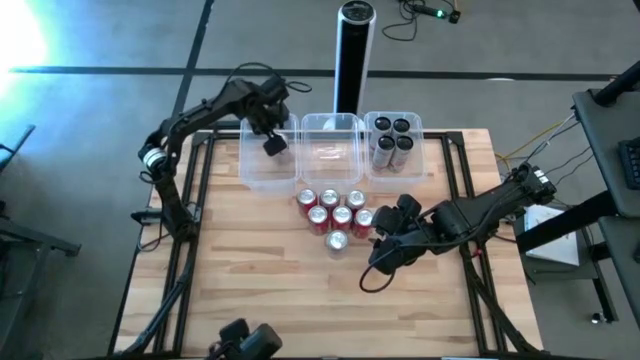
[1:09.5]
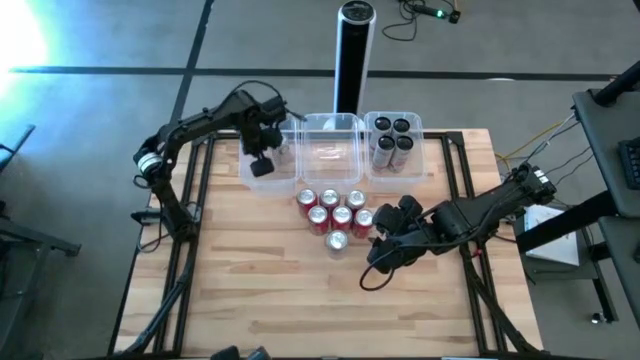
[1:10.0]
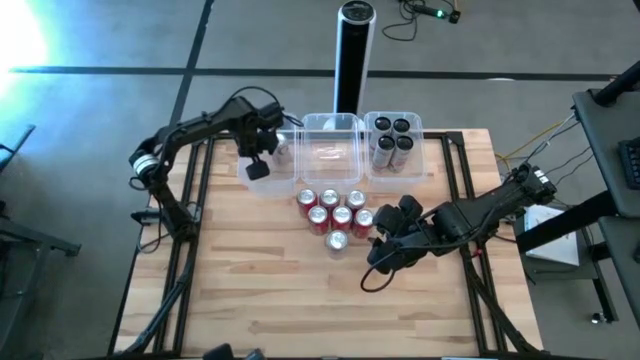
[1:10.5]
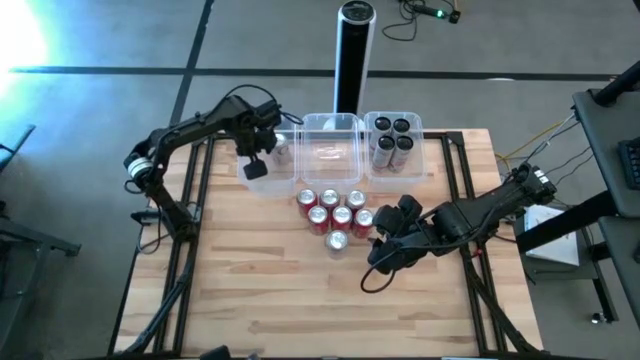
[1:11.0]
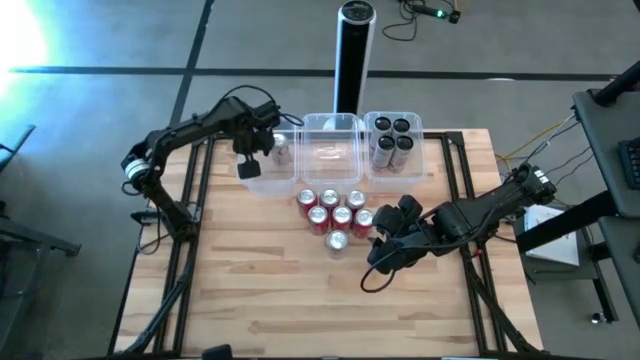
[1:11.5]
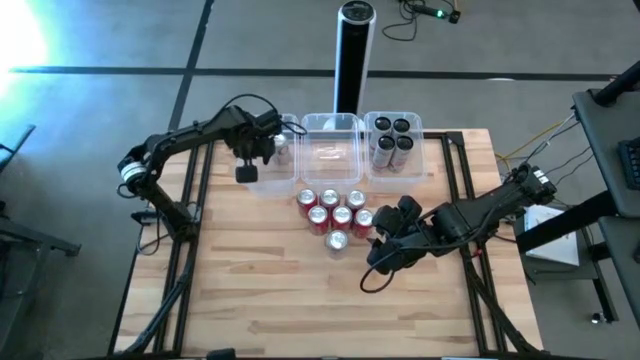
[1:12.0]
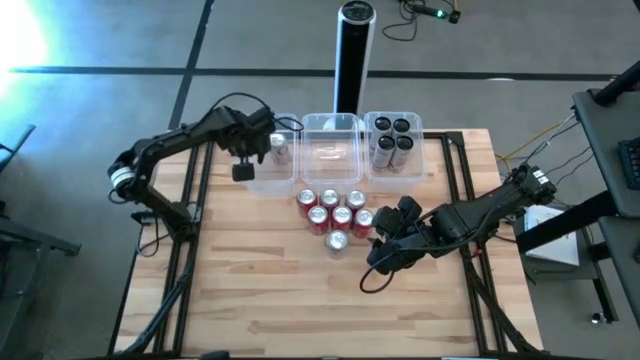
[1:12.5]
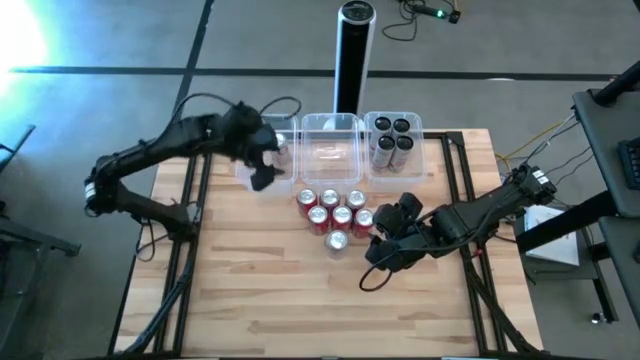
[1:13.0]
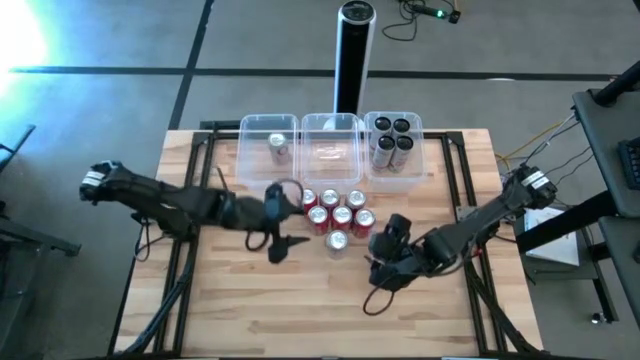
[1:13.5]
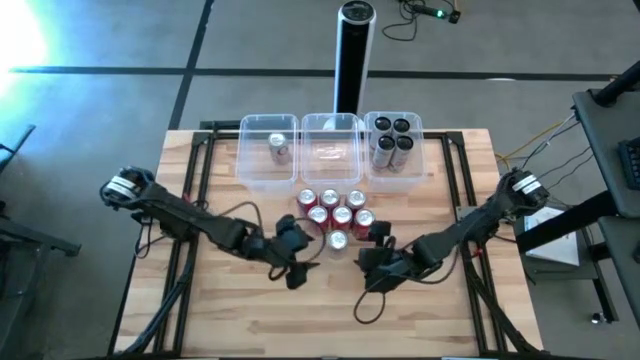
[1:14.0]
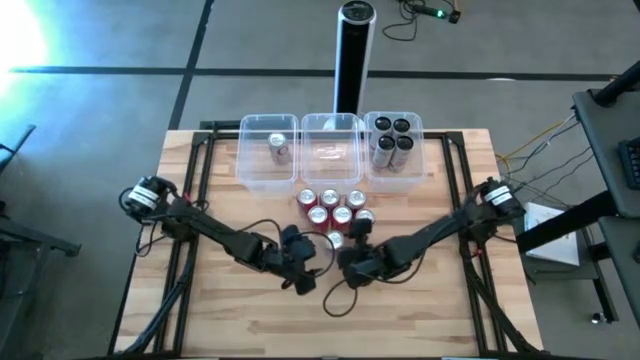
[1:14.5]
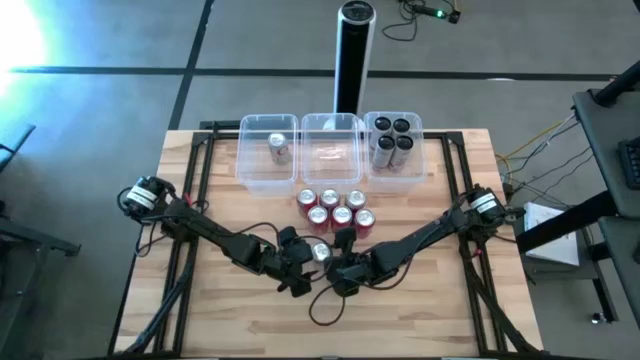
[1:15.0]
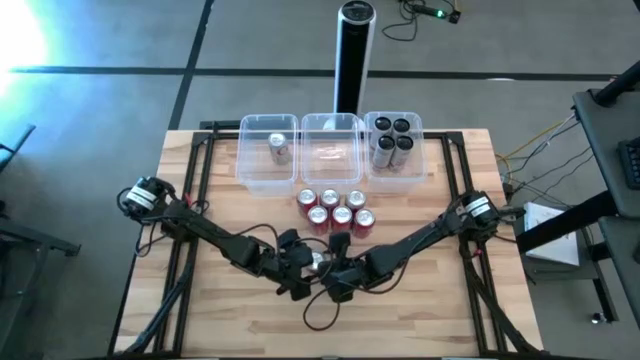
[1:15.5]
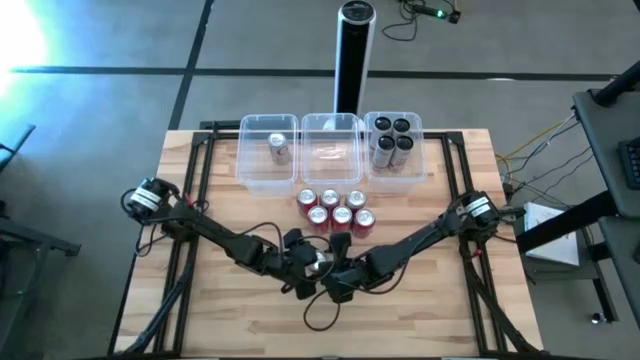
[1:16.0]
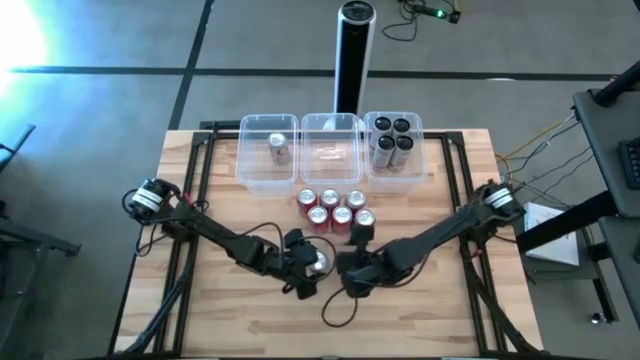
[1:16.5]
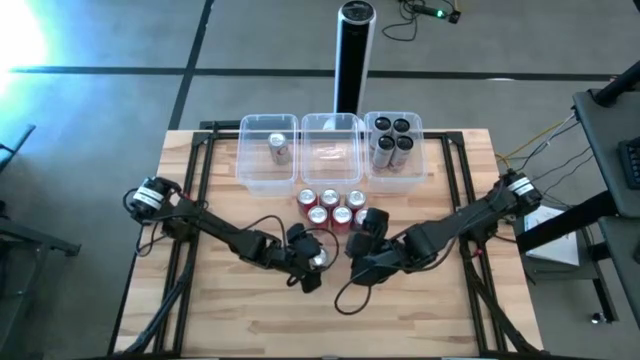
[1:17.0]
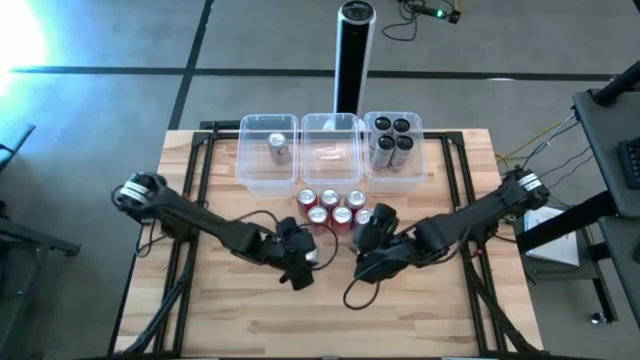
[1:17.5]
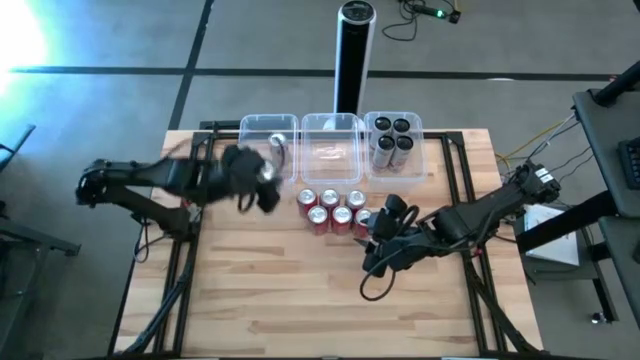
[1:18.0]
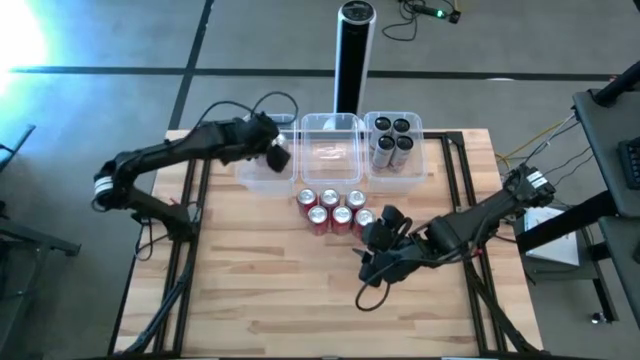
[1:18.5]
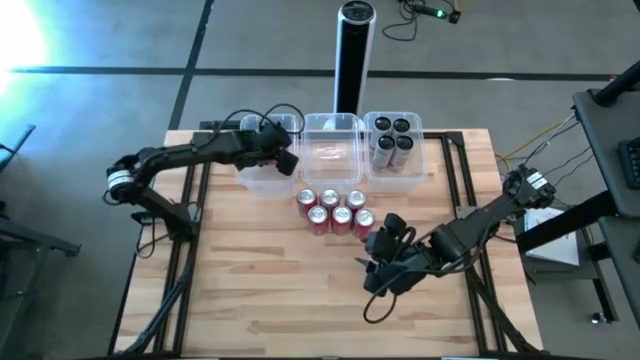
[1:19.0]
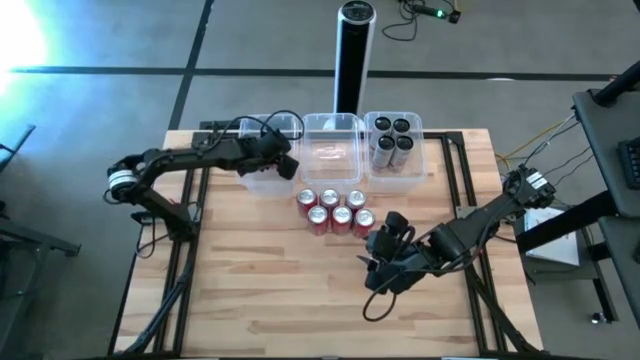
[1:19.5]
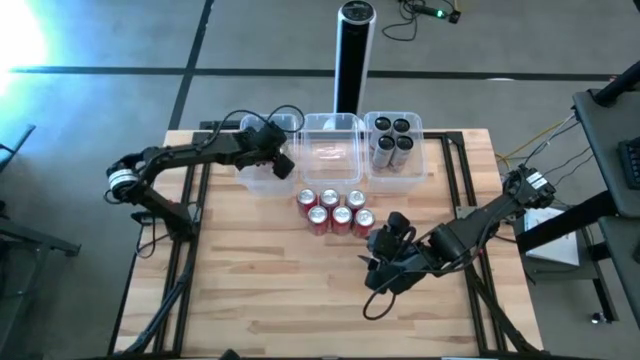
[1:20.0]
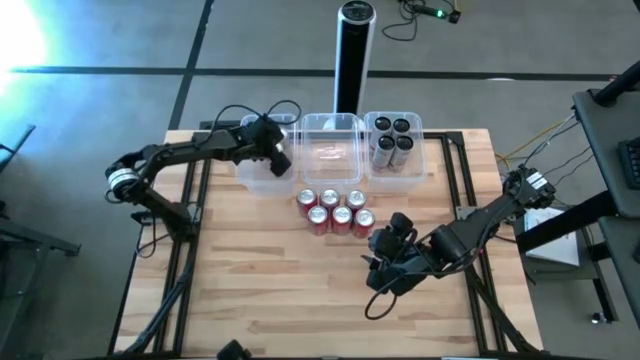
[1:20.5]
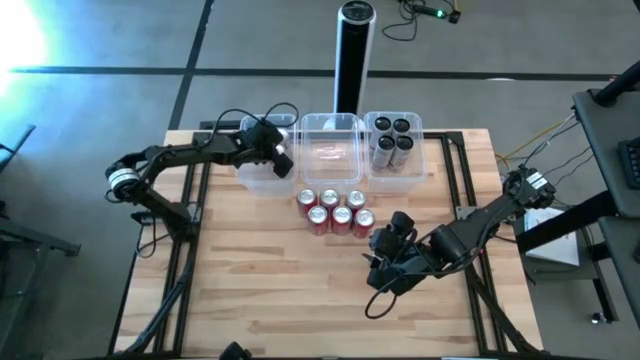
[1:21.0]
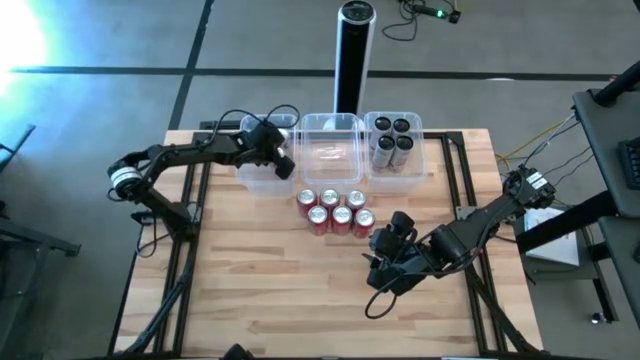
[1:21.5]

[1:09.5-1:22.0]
Task: Sort soda cans
Put the bottom white soda can into the left transparent bin

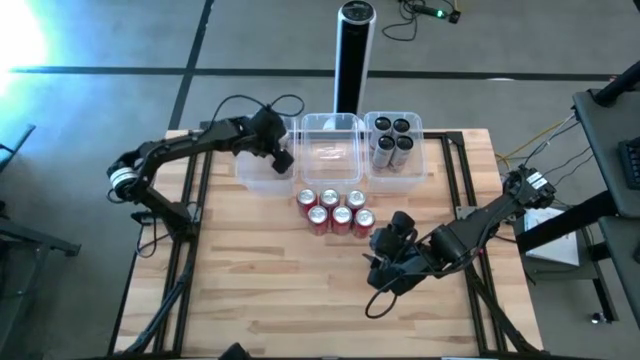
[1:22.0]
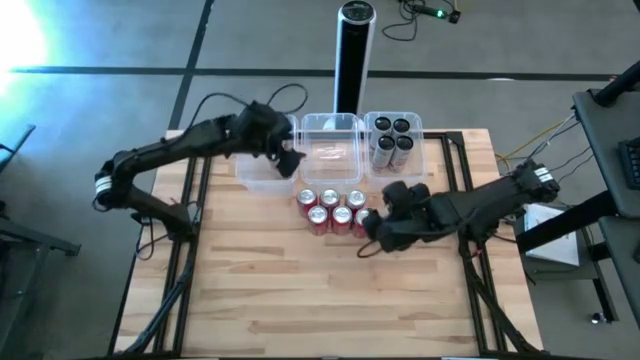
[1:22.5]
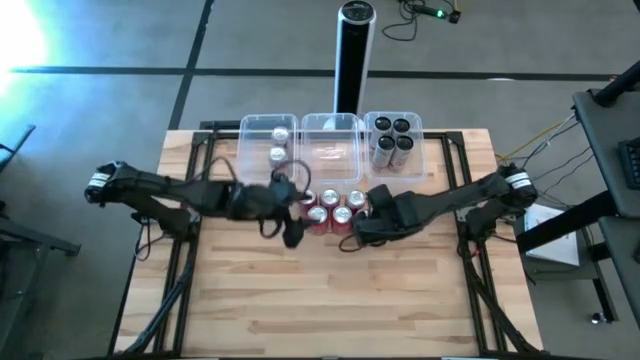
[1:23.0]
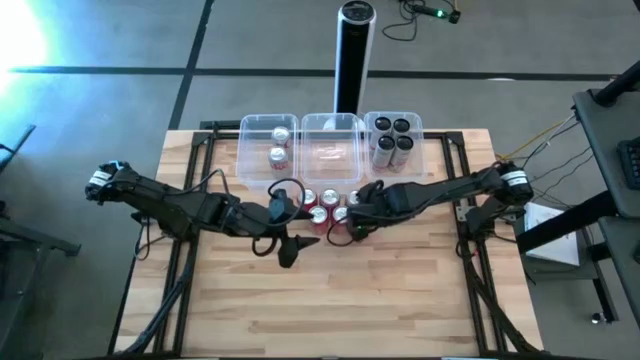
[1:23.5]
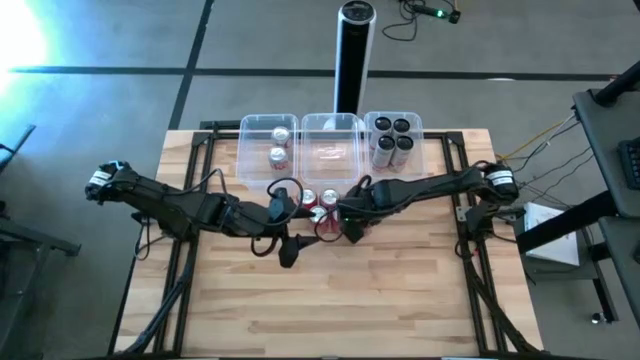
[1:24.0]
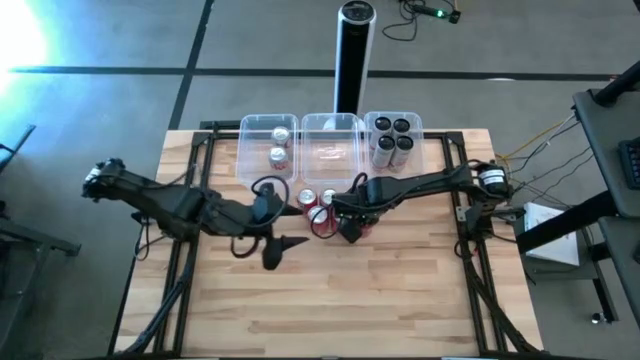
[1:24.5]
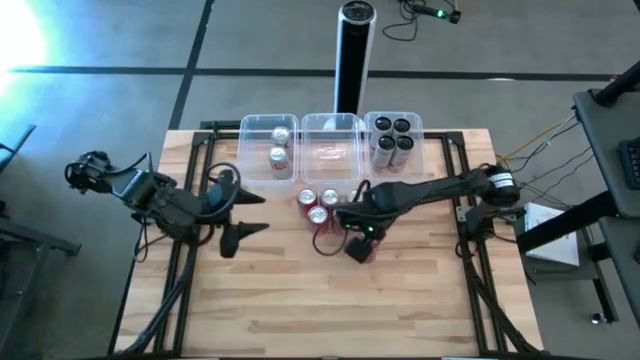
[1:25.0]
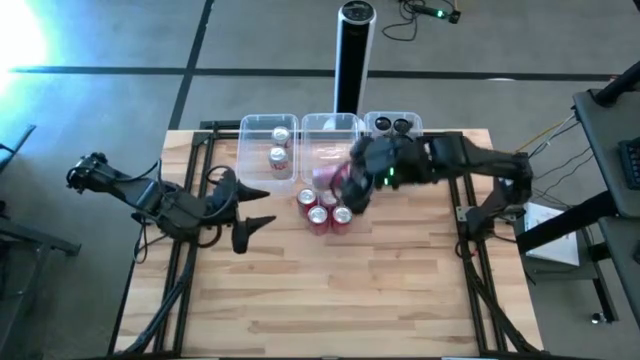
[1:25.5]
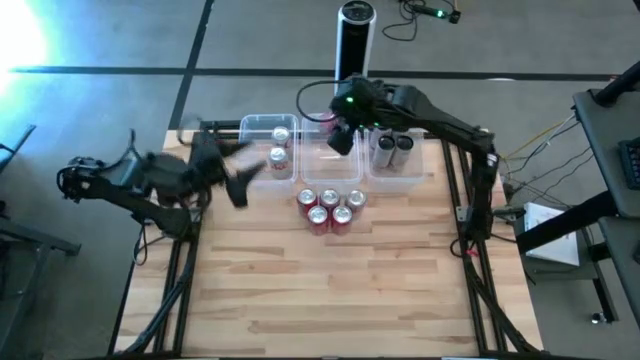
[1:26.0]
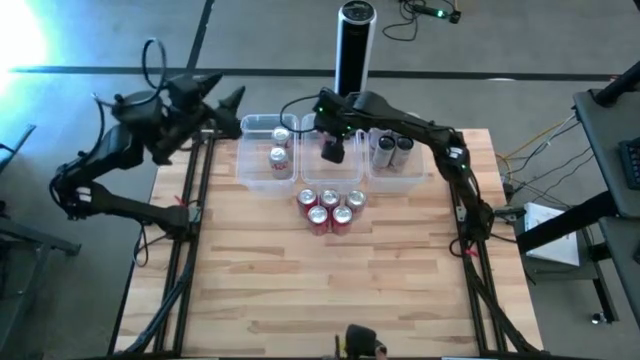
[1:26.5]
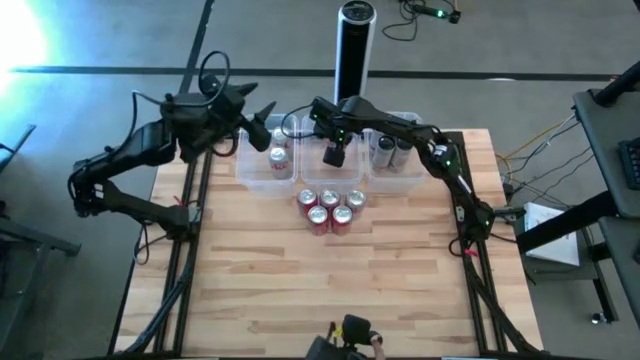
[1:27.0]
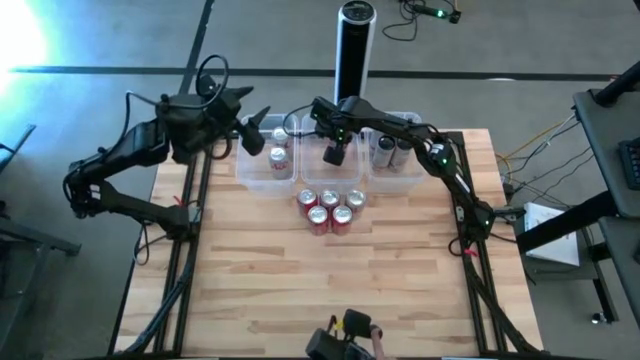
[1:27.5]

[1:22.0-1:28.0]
Put the bottom right orange soda can into the center transparent bin

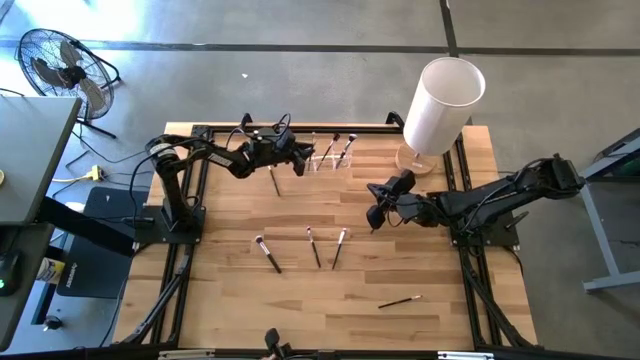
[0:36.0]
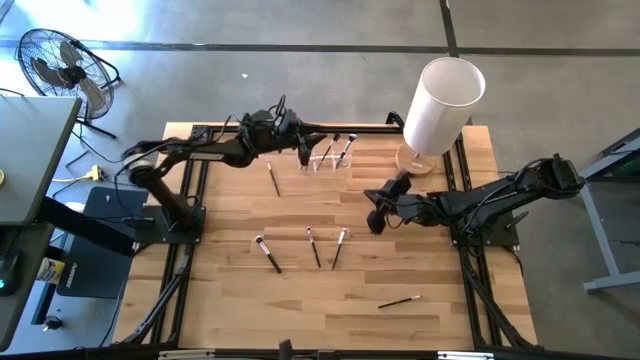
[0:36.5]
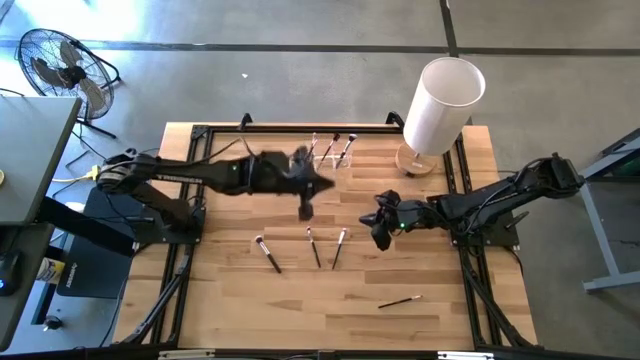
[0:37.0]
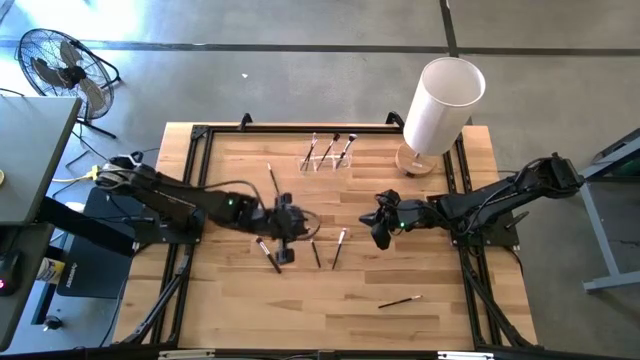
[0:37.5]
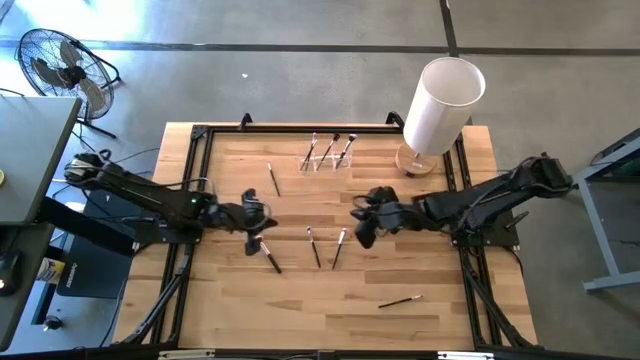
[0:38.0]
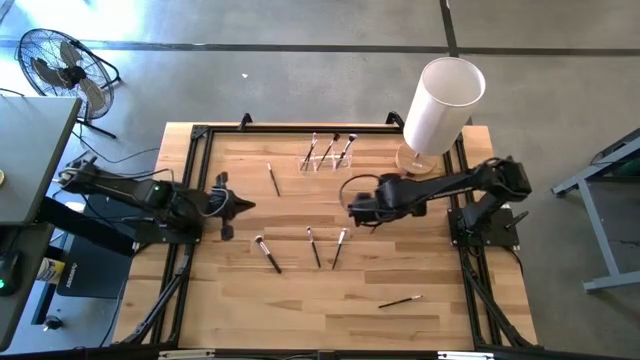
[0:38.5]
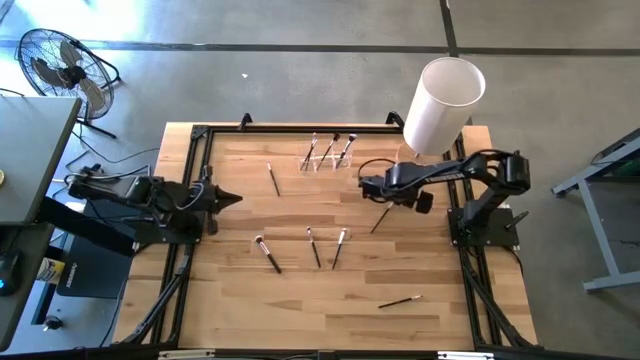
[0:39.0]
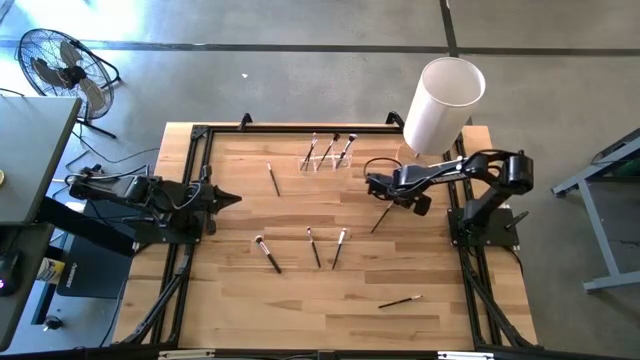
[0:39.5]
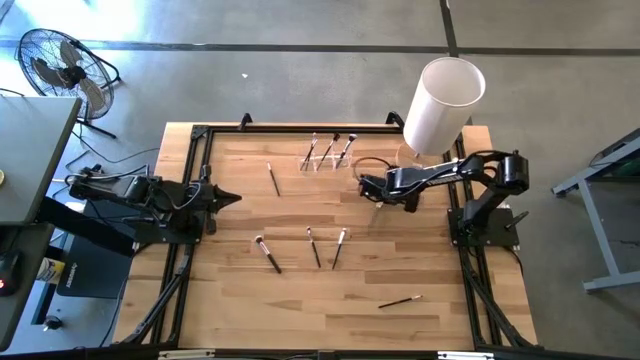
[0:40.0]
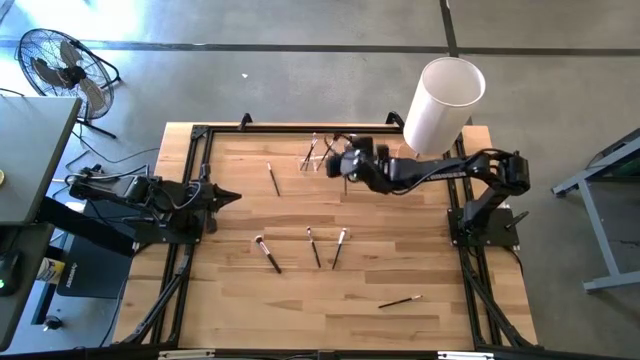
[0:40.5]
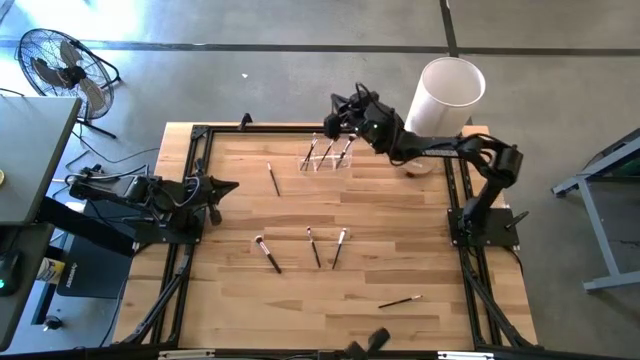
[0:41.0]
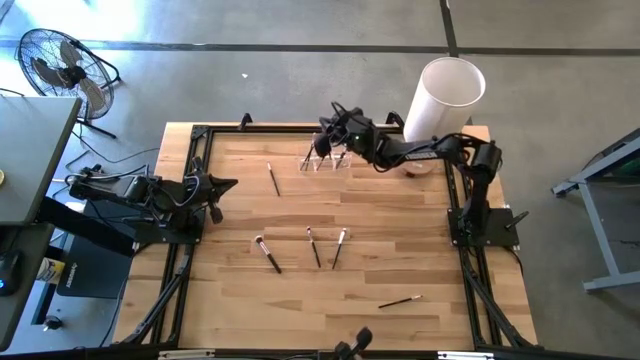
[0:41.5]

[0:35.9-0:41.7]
Task: Pick & Place Makeup Brushes
Put the black eyeshadow brush into the transparent organizer
